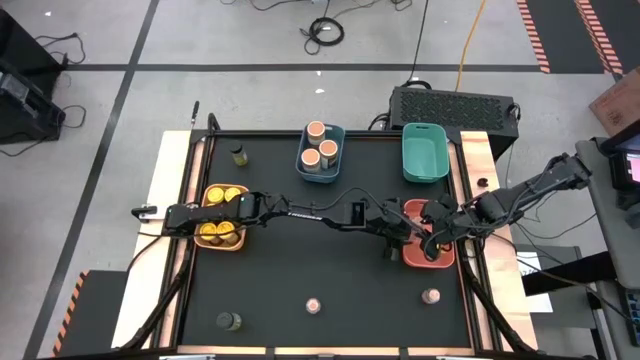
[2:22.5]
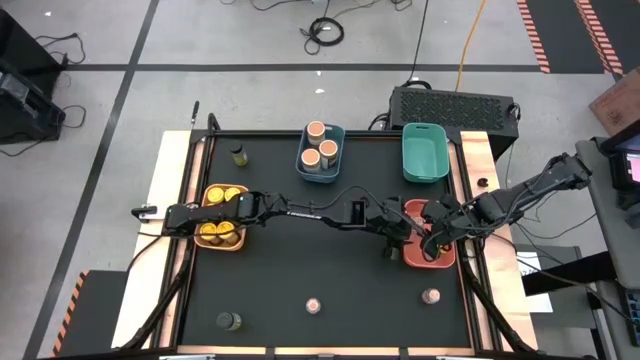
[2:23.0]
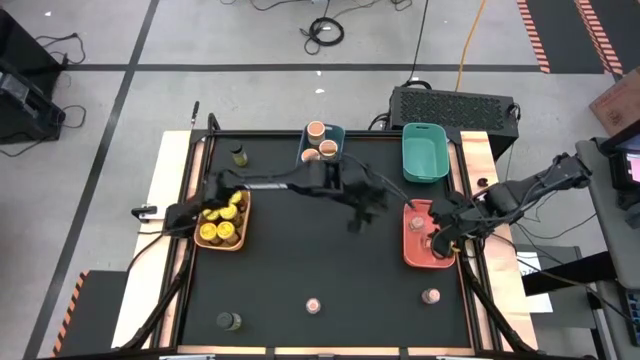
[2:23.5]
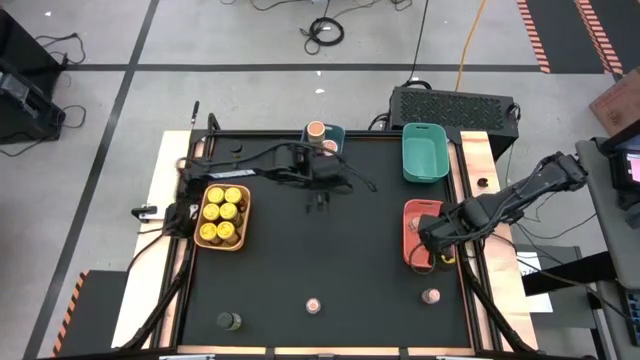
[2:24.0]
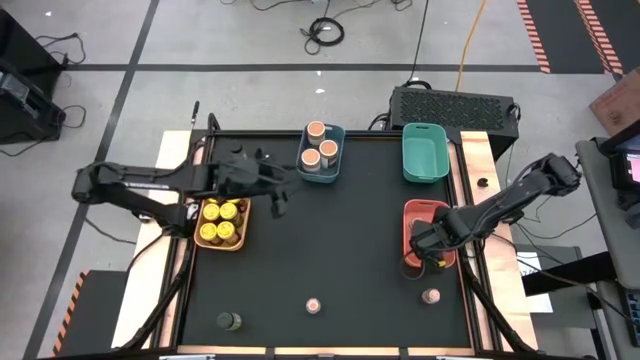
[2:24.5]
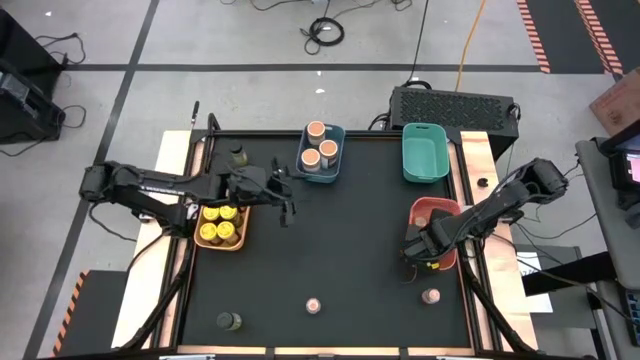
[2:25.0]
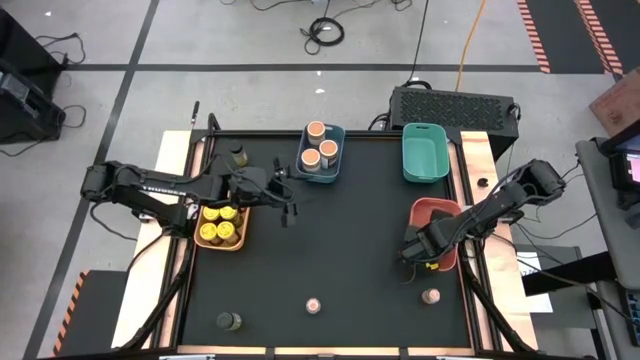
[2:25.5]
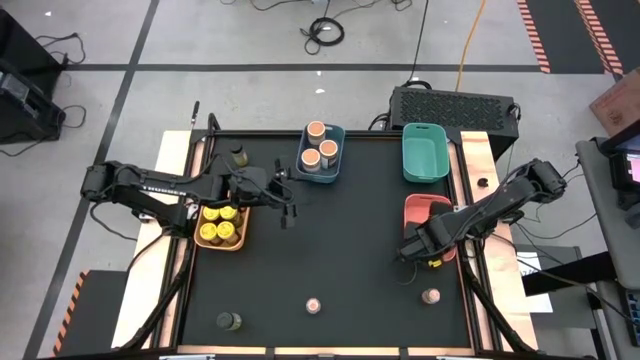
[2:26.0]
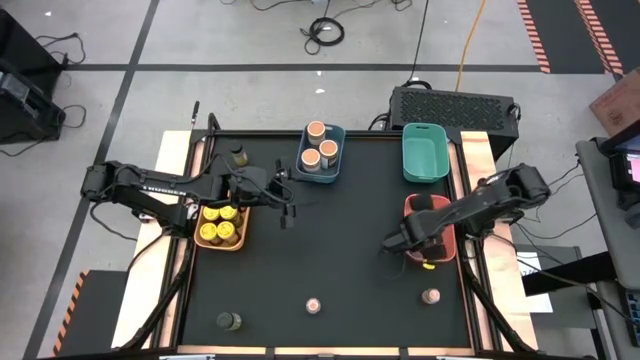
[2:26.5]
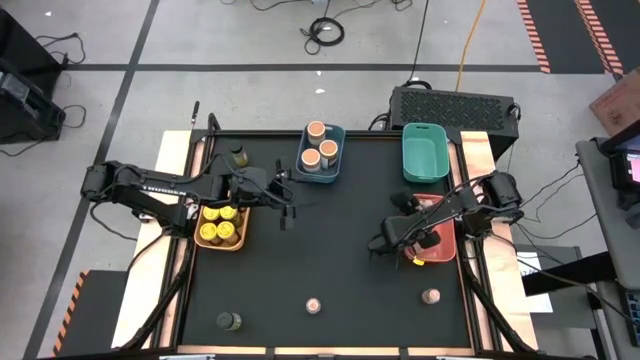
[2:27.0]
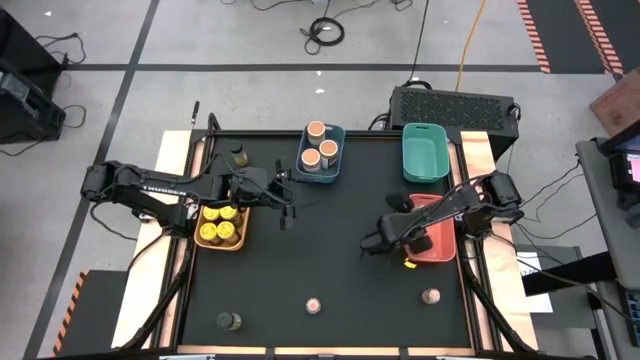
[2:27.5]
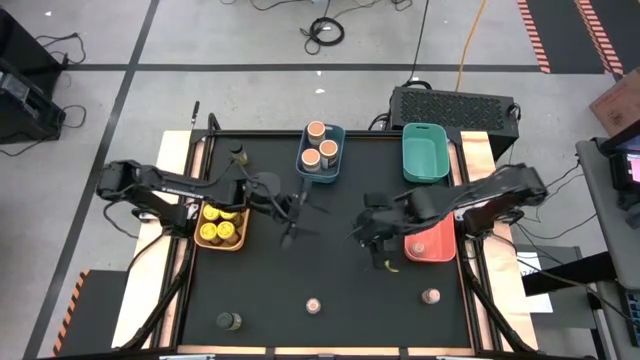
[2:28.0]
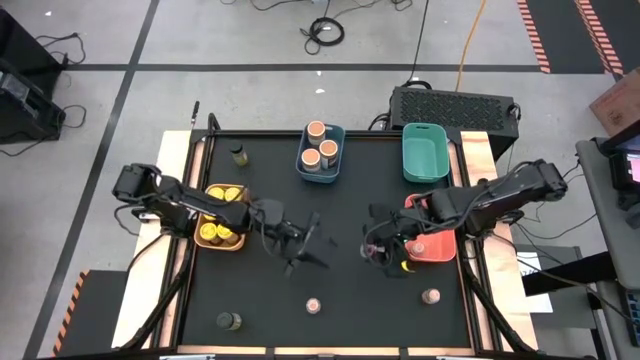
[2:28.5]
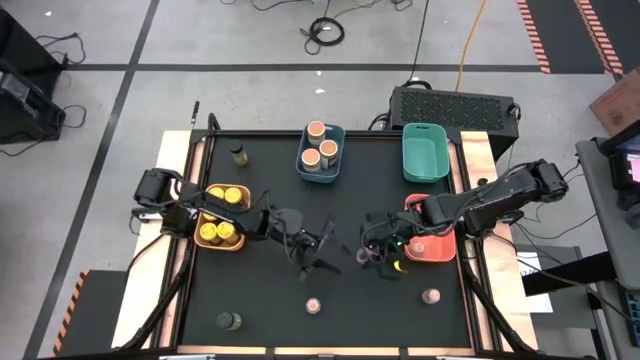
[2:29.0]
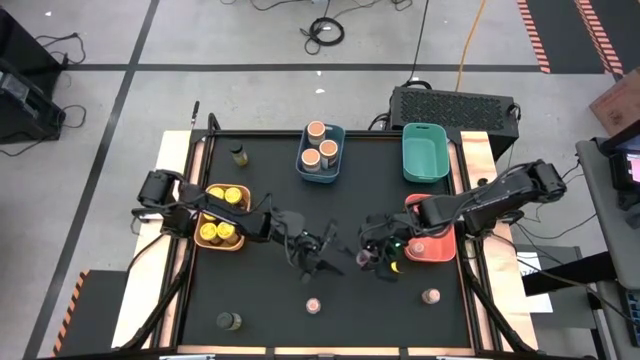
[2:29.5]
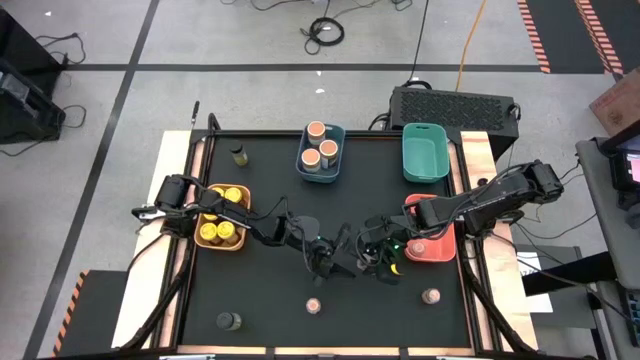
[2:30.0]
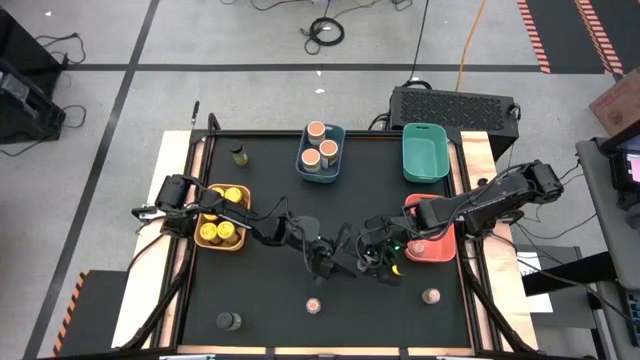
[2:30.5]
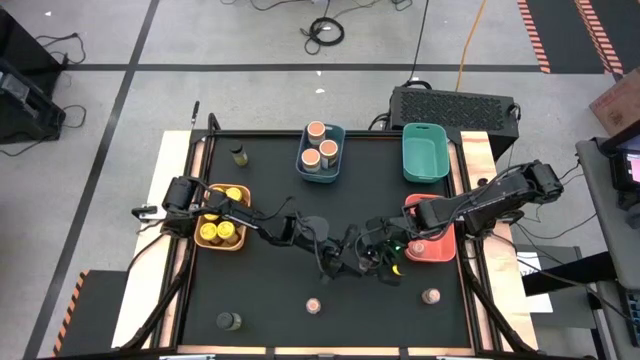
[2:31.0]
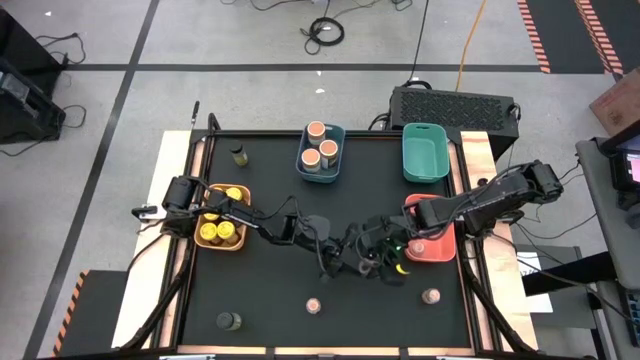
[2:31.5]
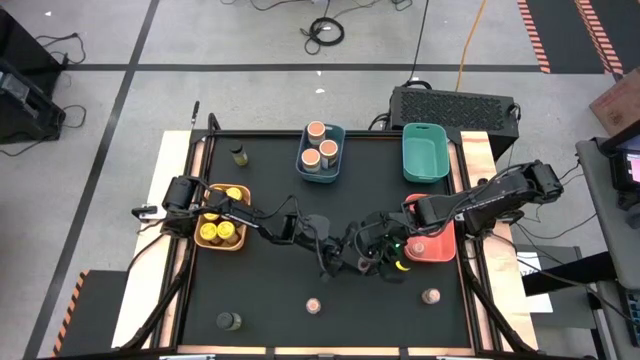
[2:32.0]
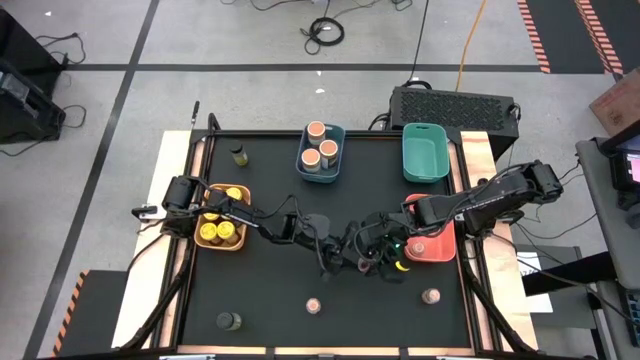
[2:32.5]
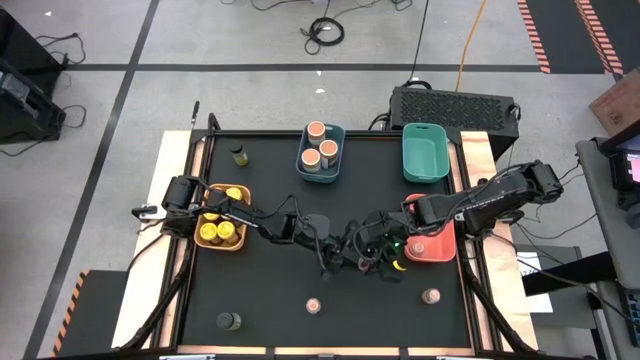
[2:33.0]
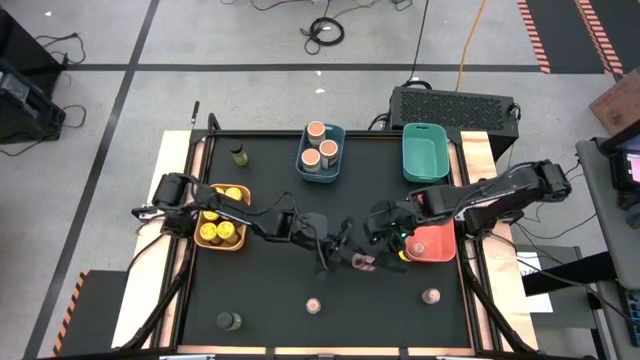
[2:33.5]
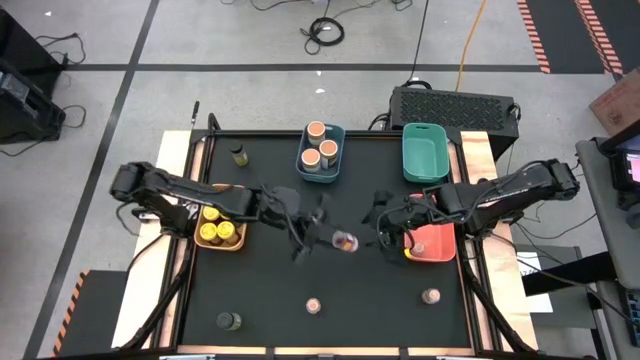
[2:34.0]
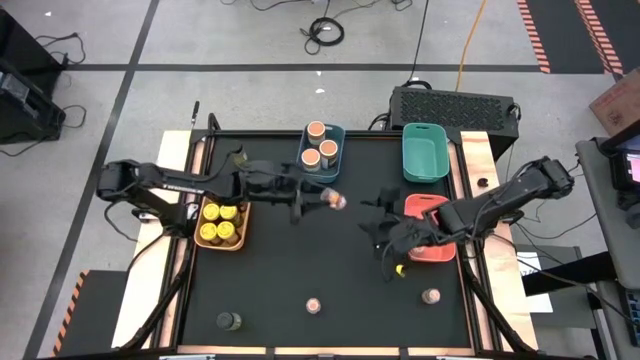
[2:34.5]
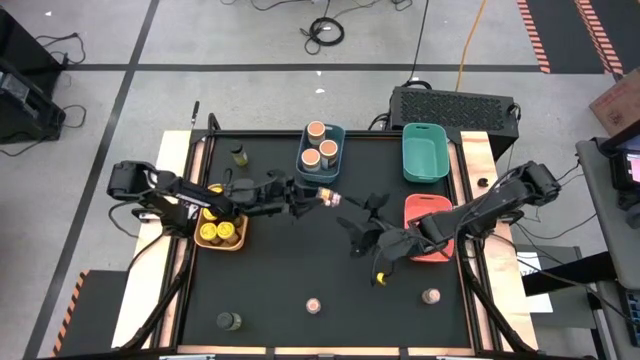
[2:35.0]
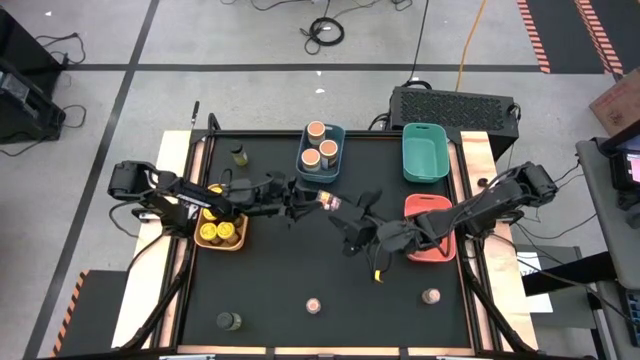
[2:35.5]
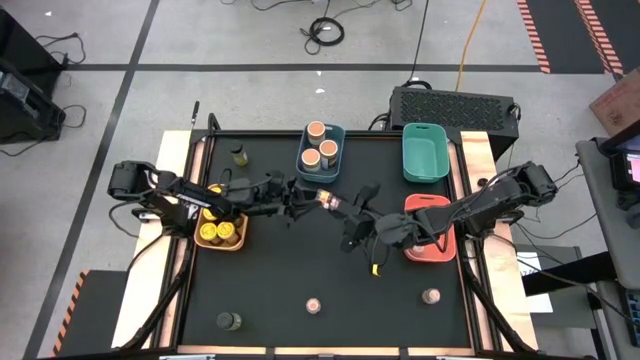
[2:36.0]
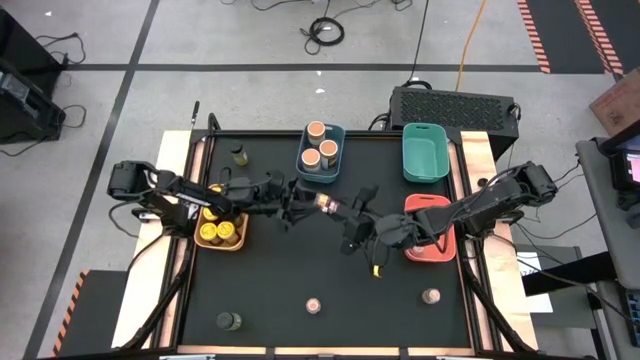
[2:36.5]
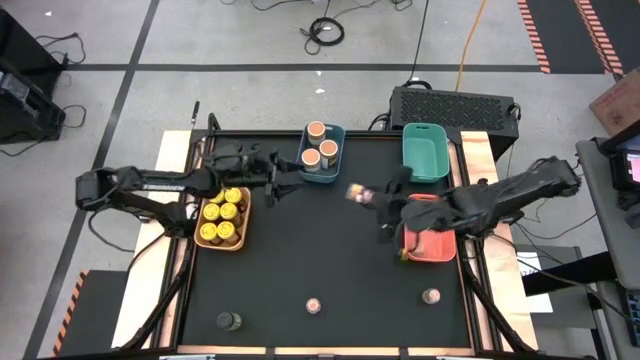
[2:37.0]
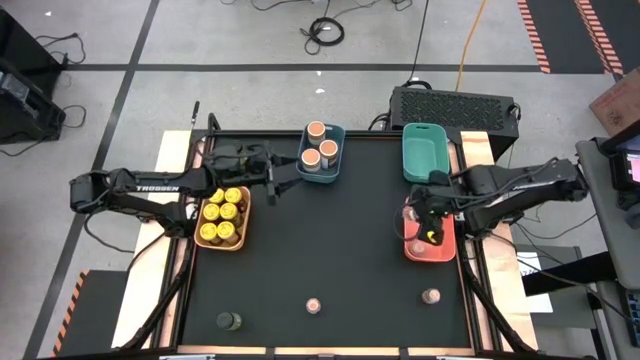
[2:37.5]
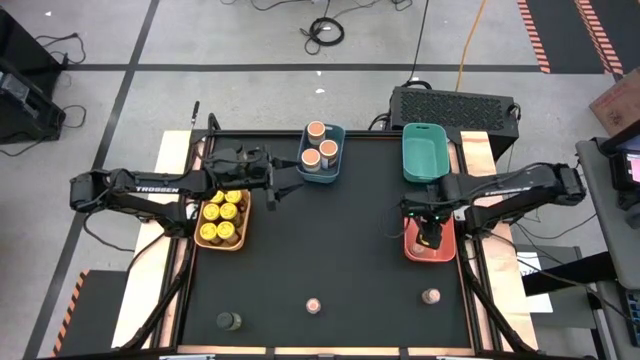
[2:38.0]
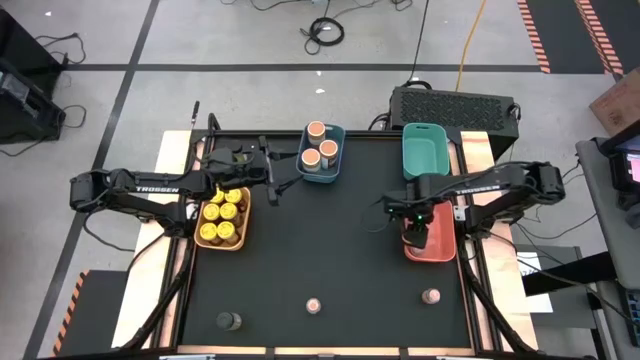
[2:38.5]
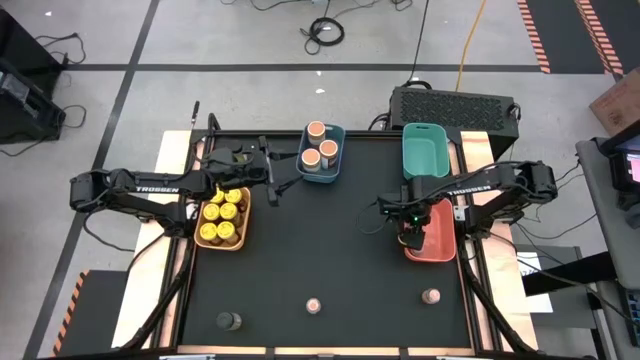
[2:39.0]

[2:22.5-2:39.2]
Task: Sort spices by type
Put the small brown seasoning bottle into the orange bin

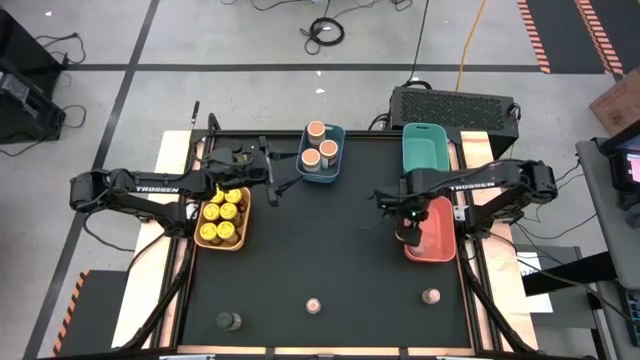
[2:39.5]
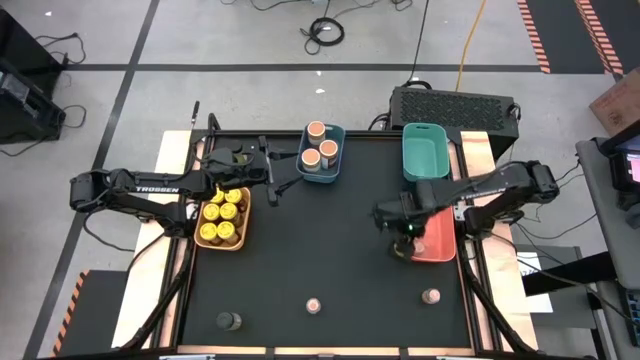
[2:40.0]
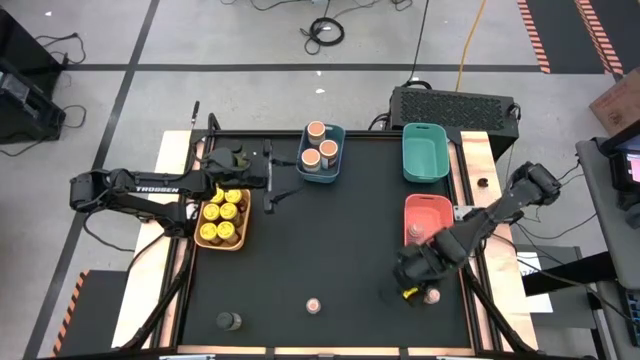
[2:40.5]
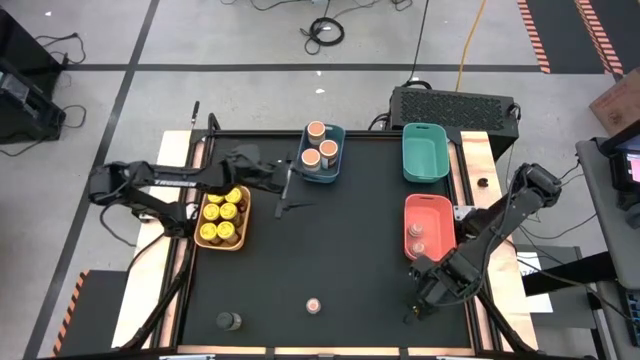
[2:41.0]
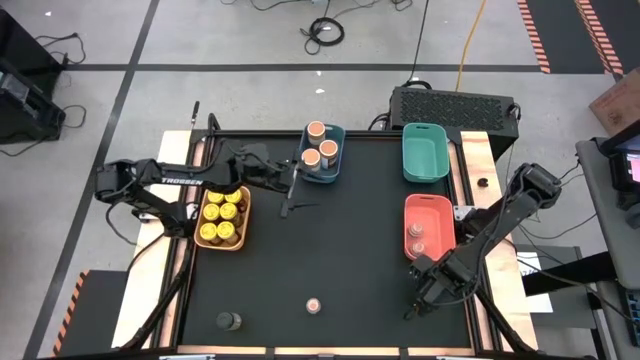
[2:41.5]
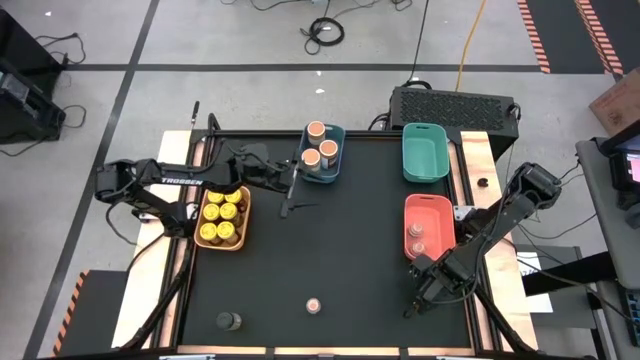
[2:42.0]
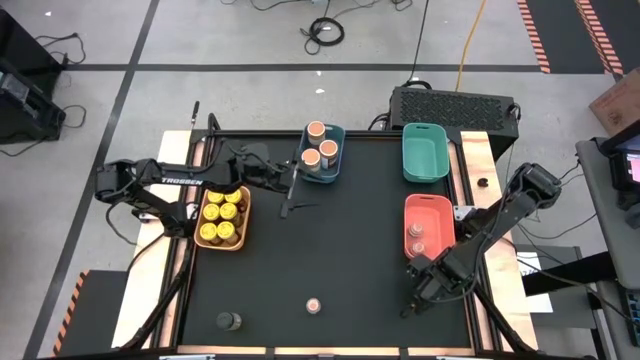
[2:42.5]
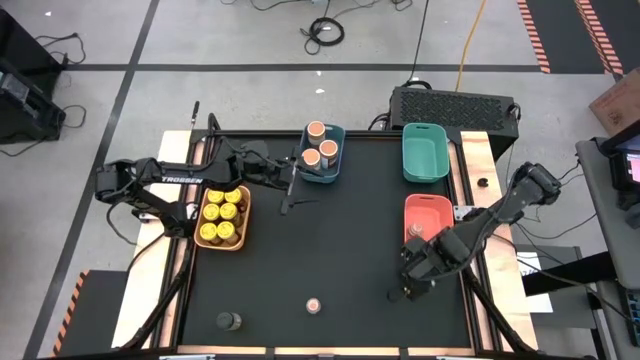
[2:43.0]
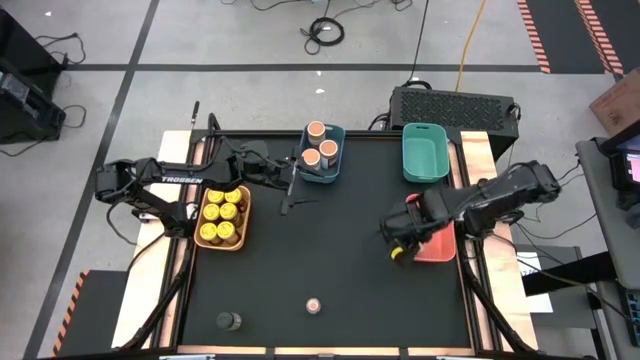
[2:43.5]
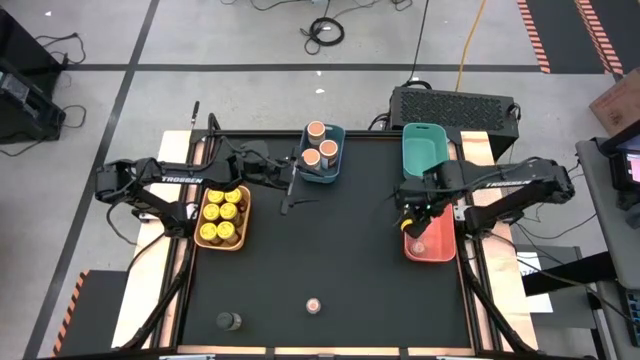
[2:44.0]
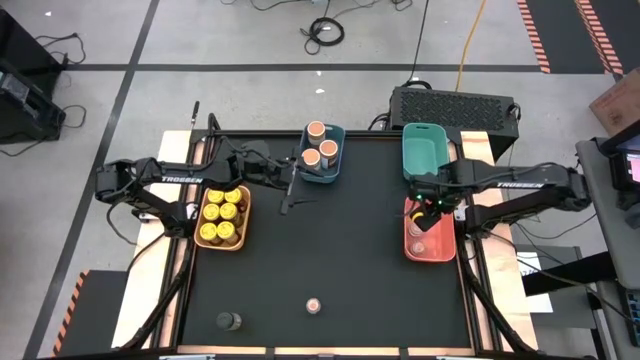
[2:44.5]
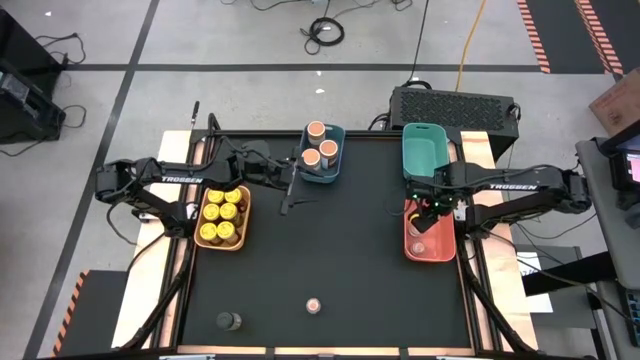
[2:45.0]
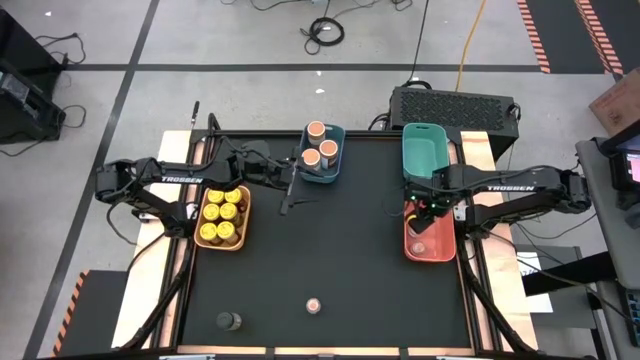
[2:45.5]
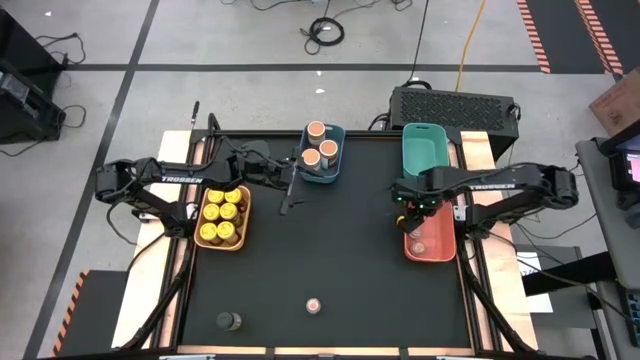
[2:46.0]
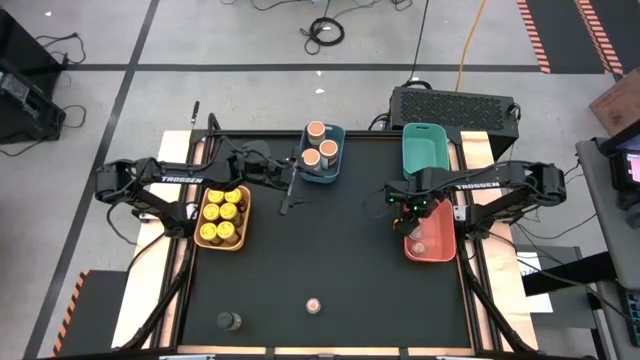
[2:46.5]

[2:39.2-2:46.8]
Put the small brown seasoning bottle into the orange bin
